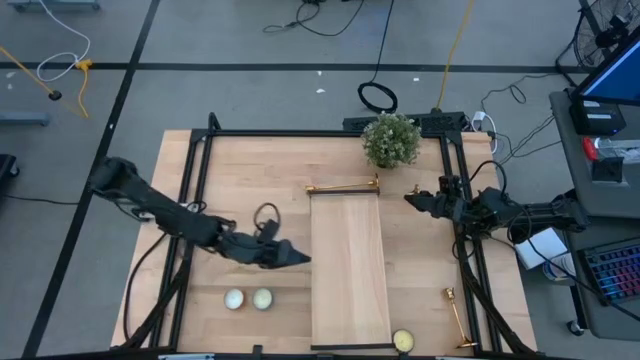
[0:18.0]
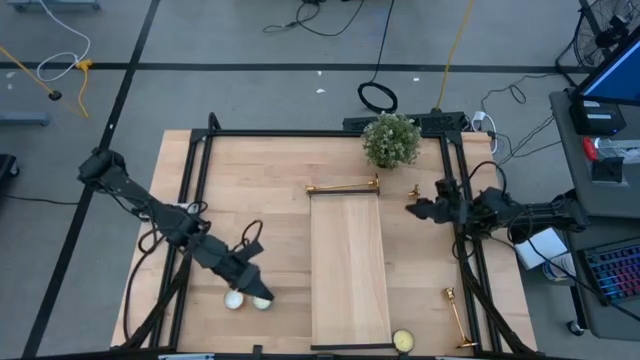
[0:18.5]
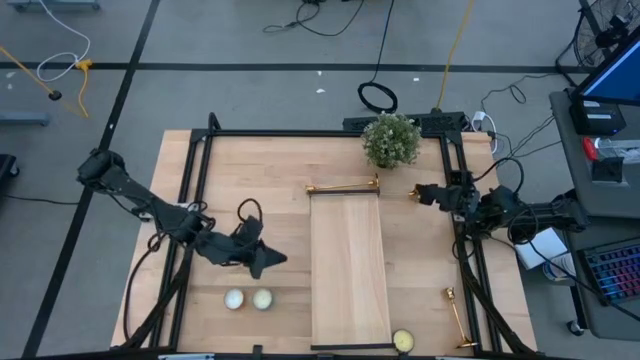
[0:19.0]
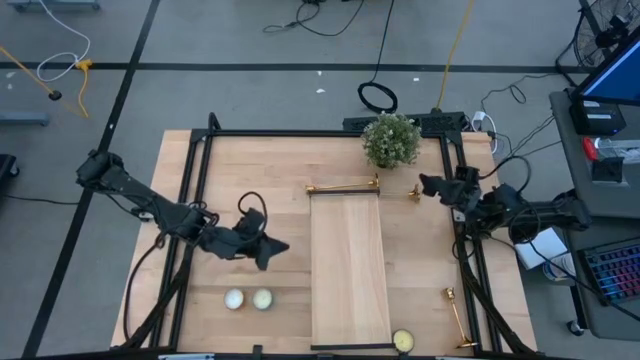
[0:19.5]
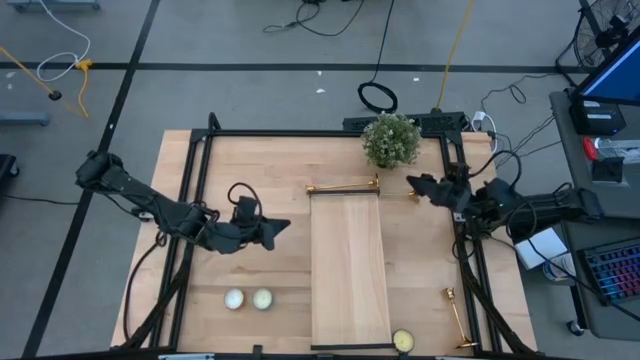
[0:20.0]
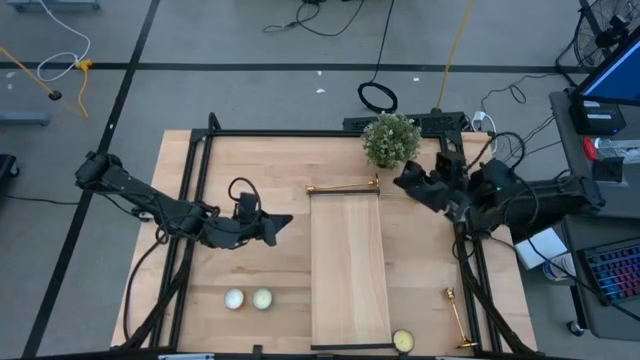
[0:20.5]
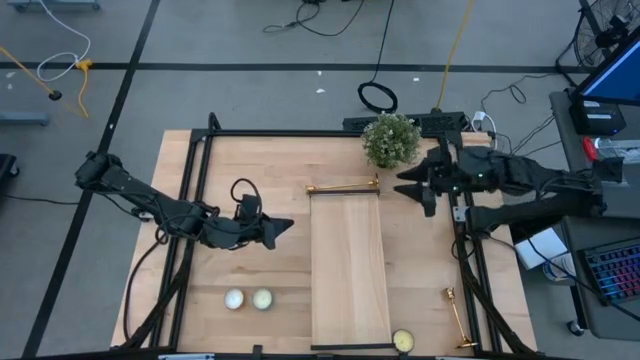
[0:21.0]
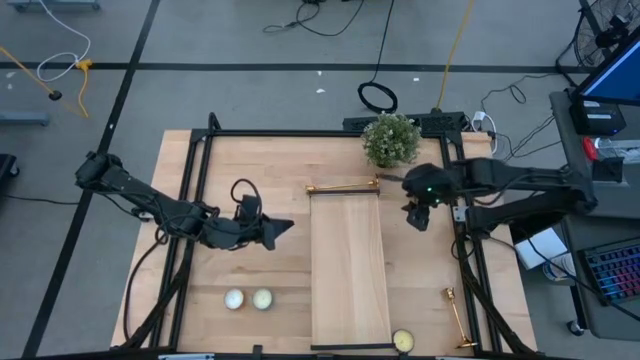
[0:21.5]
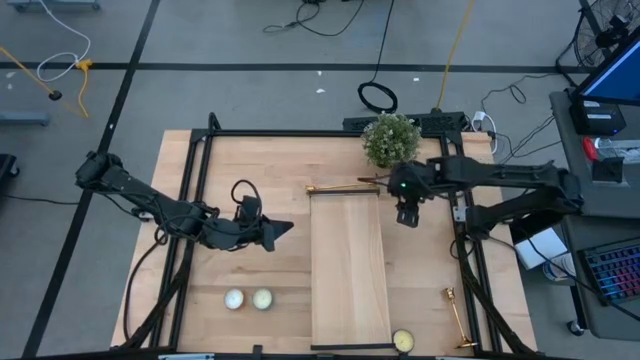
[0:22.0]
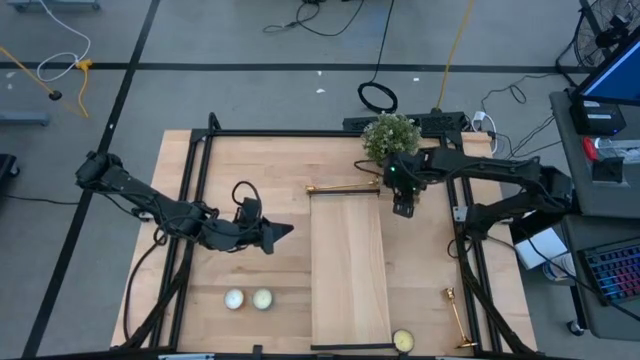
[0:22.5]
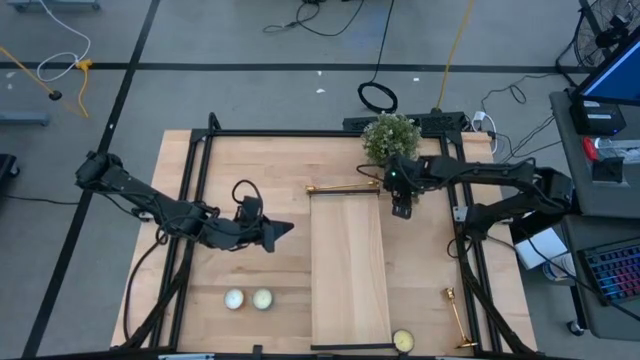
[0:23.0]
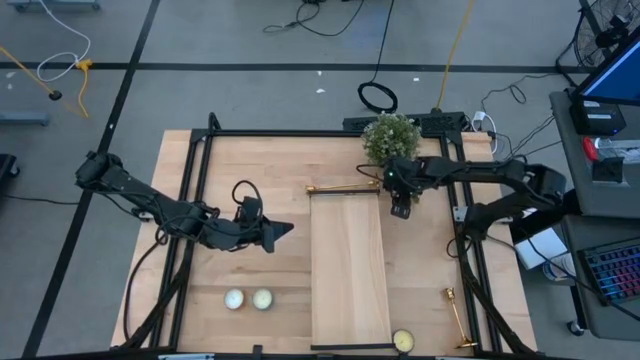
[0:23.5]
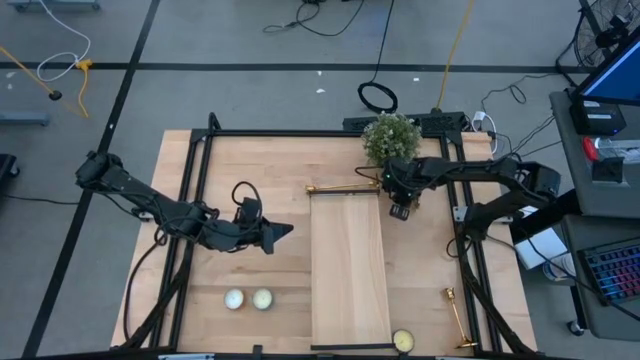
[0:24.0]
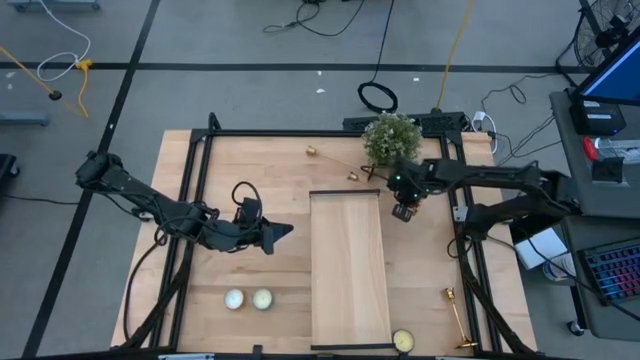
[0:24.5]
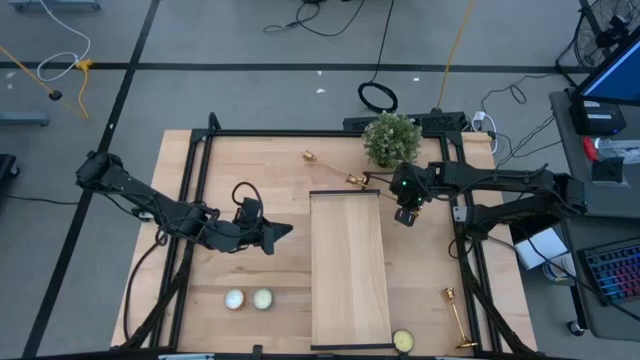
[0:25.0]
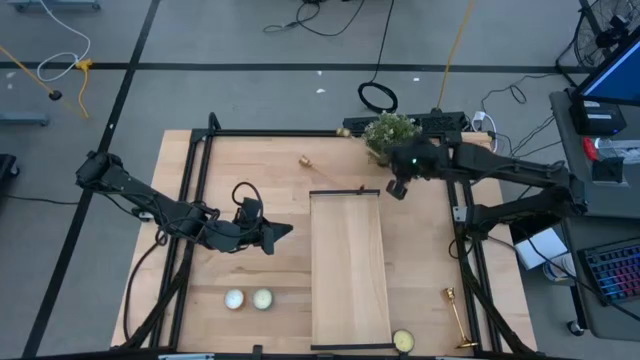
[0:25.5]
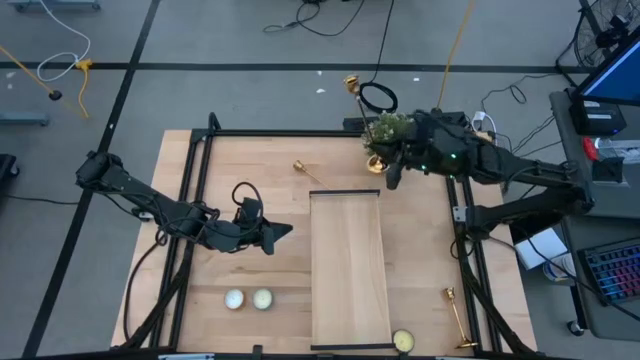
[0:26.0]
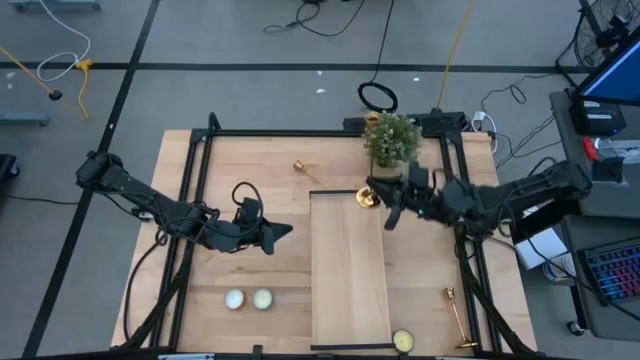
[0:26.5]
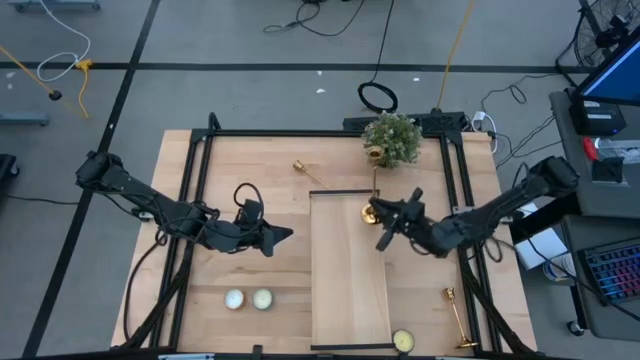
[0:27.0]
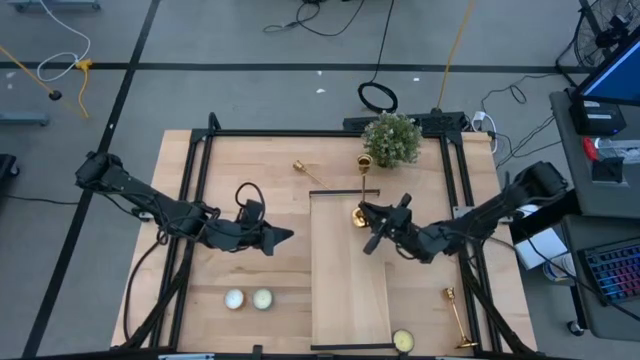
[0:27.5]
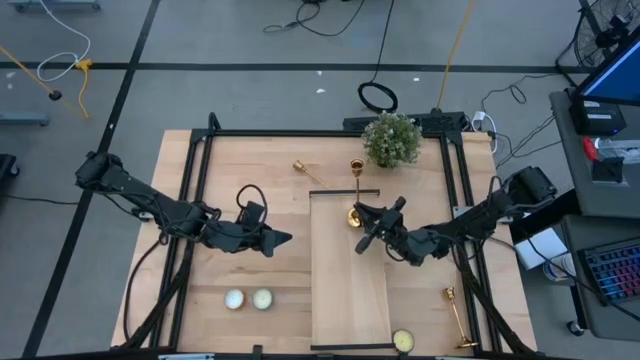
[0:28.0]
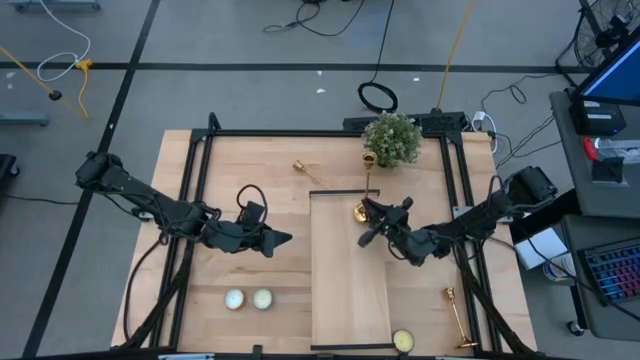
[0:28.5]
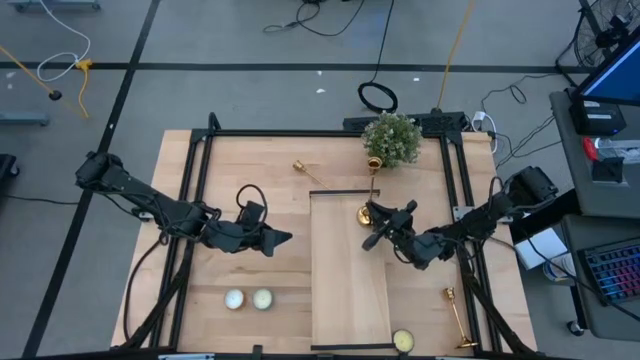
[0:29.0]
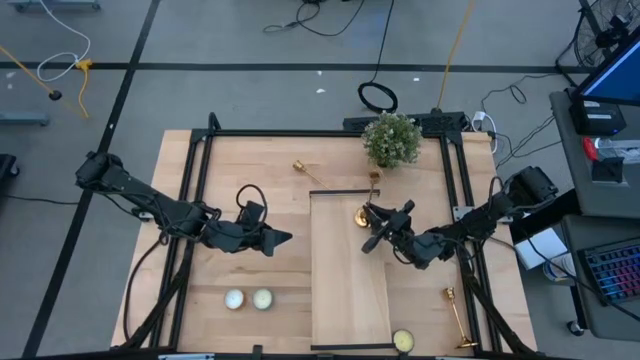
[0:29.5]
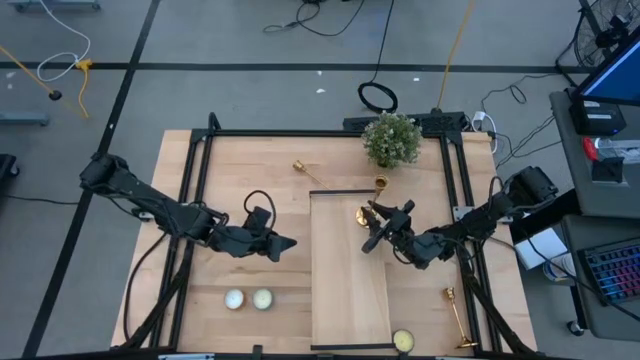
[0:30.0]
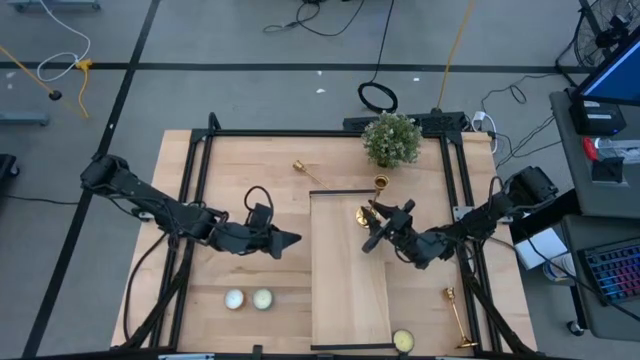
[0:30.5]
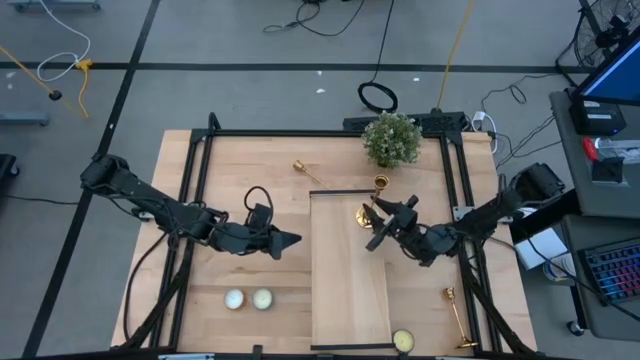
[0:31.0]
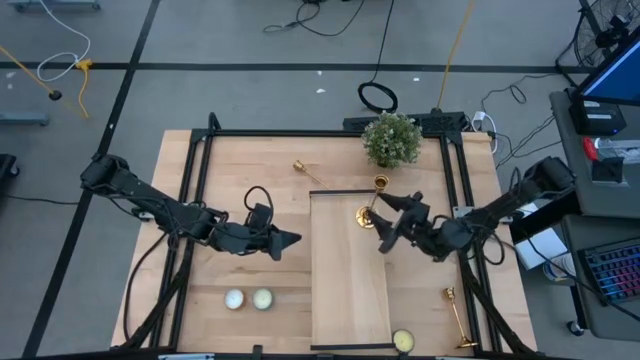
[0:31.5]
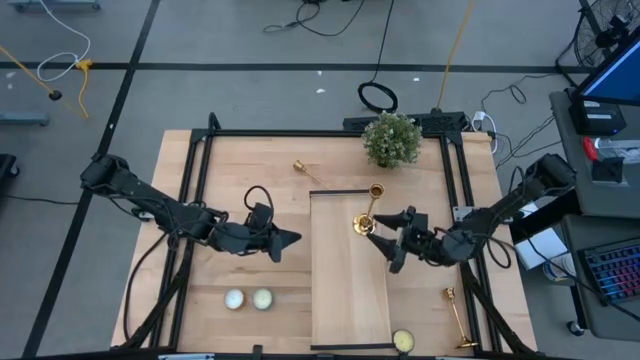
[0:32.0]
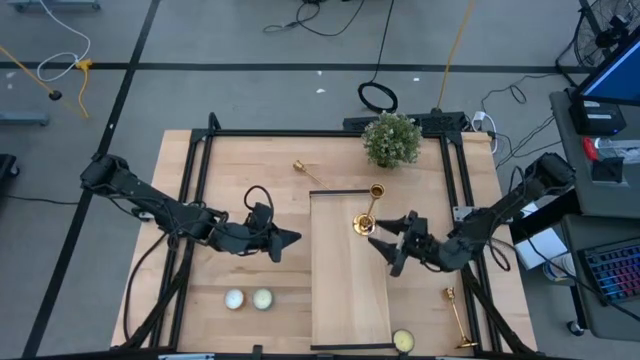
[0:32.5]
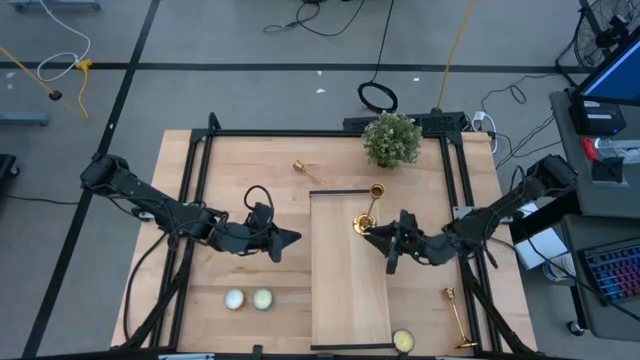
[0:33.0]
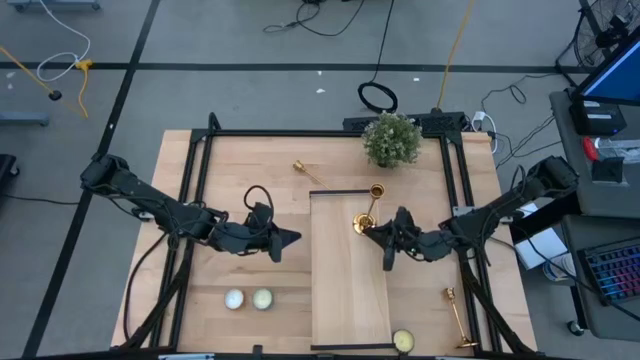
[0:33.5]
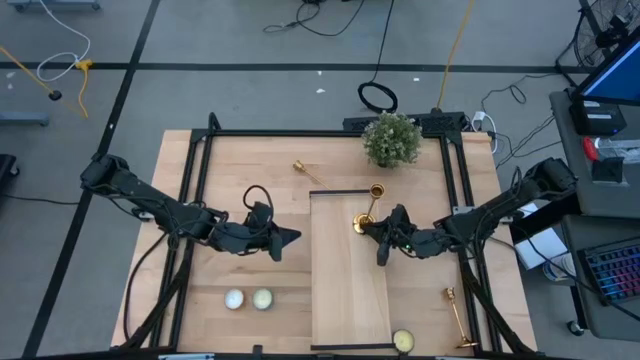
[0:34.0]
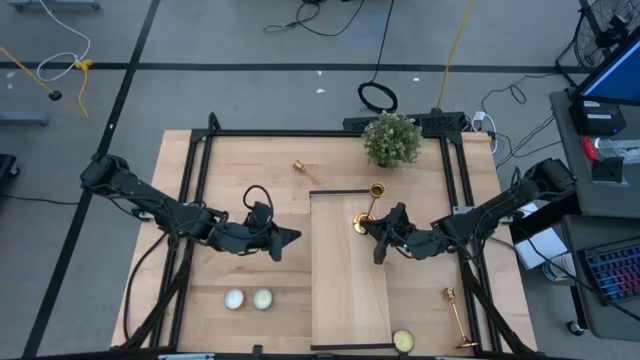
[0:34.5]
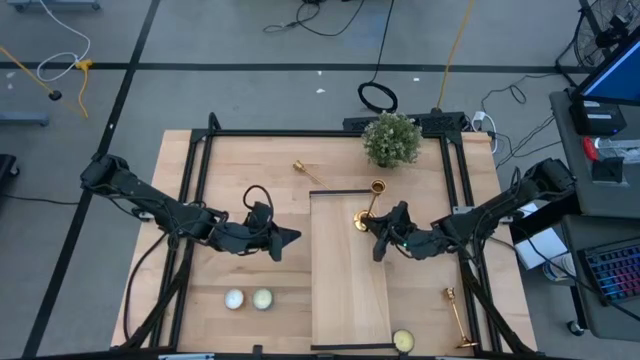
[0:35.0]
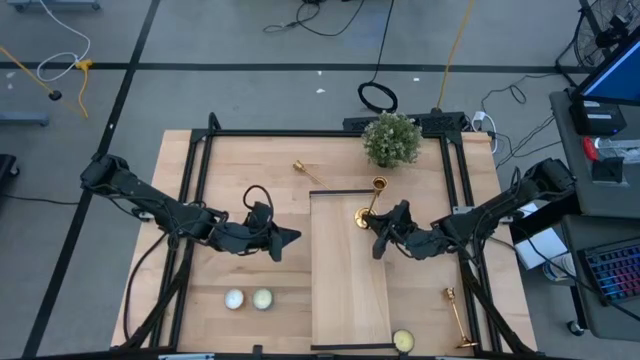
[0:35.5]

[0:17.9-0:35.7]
Task: Pick & Place candle stick holders
Put the top right gold candle holder on the shelf

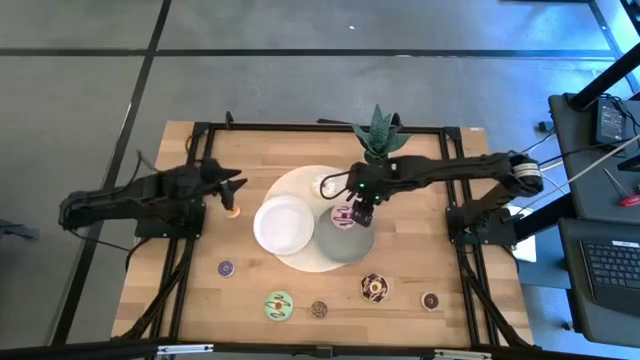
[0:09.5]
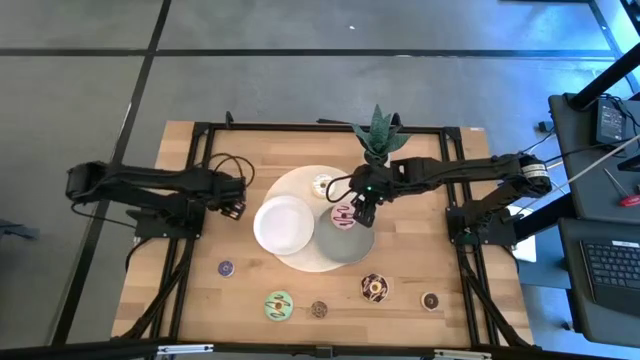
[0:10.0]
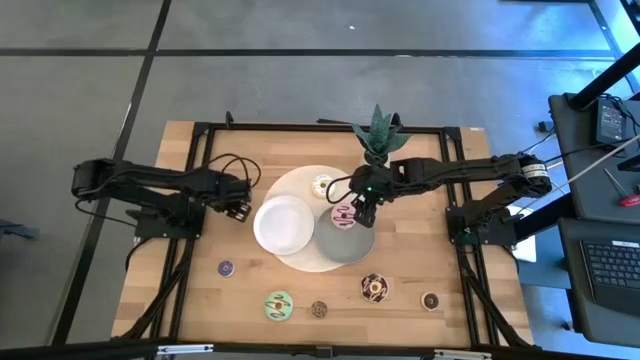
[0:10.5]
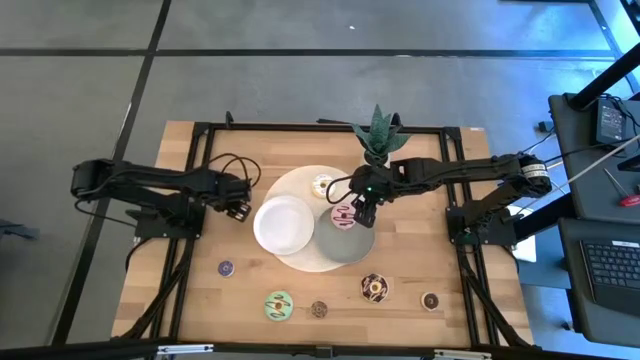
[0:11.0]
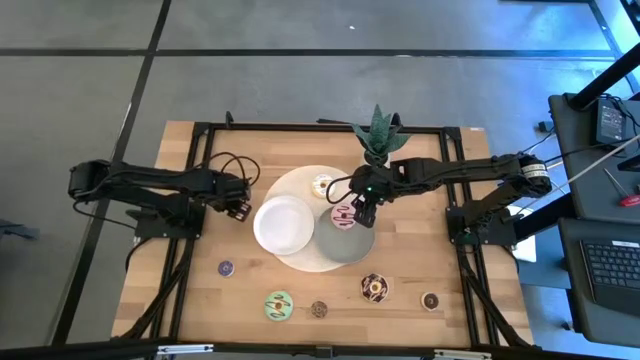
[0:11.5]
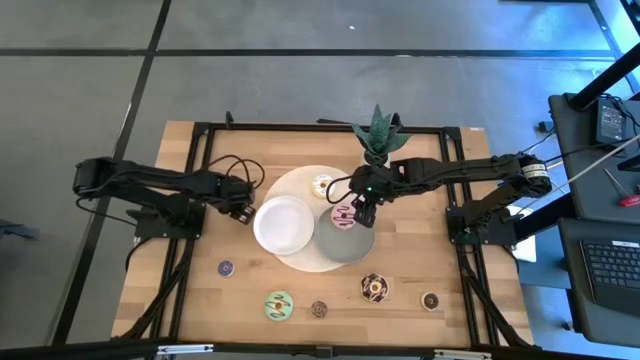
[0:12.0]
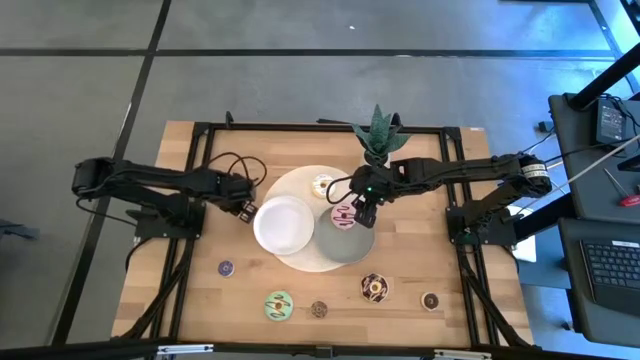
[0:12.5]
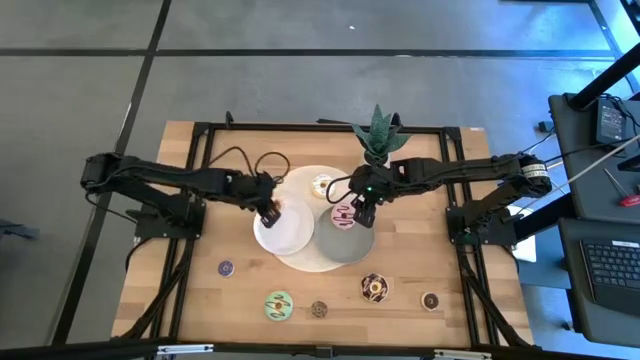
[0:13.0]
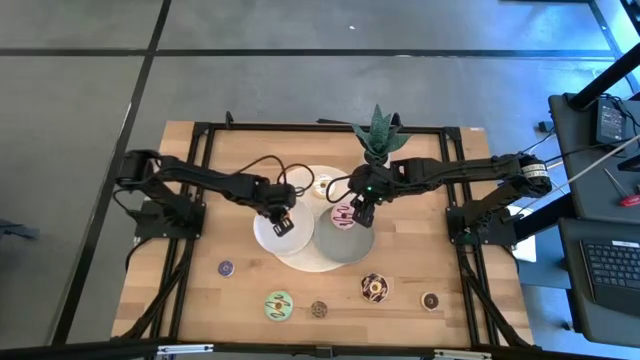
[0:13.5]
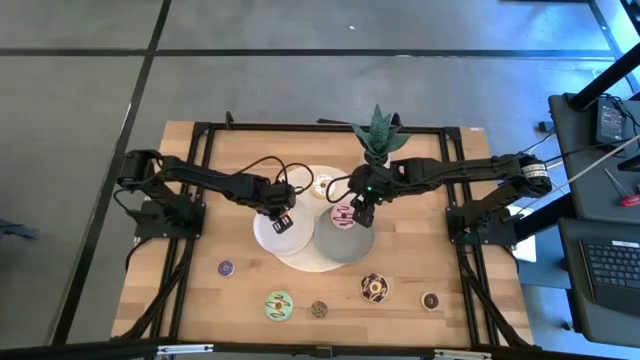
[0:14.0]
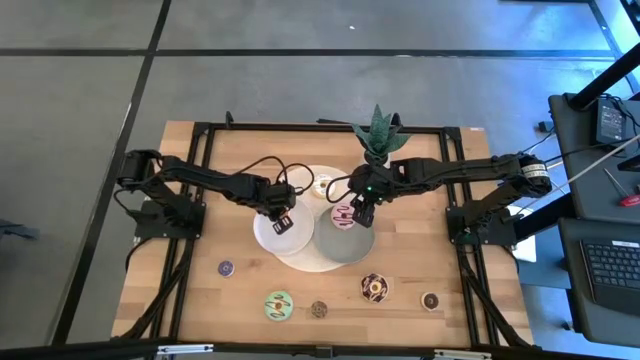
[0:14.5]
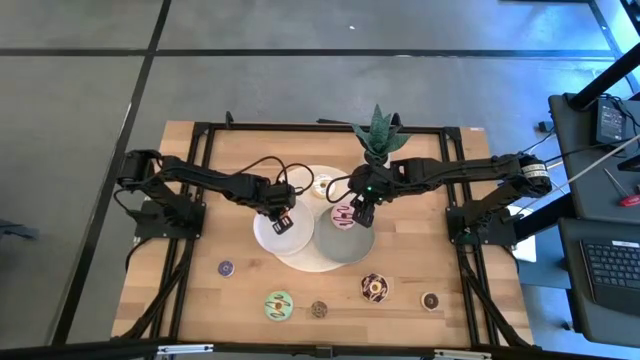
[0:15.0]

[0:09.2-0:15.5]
Task: Pick & Place donuts
Put the small yellow donut on the white plate
